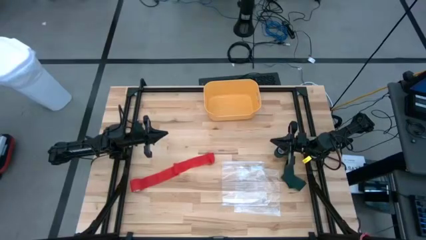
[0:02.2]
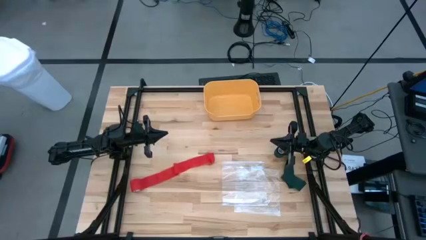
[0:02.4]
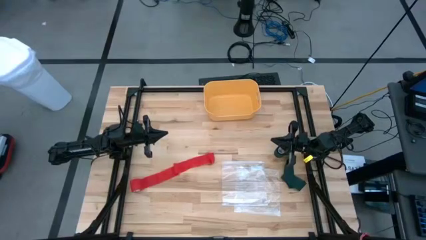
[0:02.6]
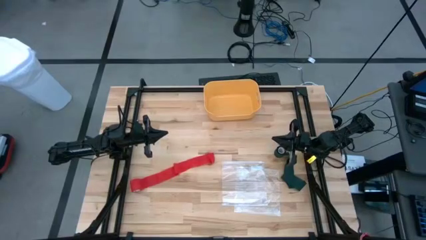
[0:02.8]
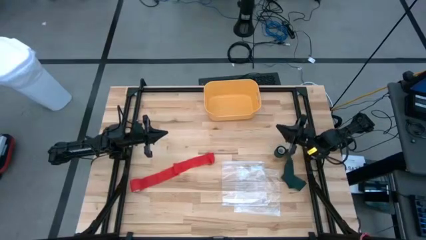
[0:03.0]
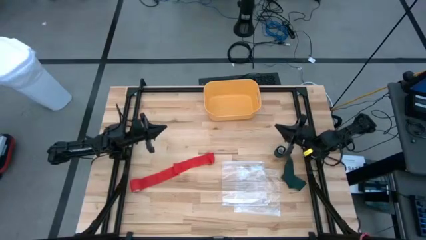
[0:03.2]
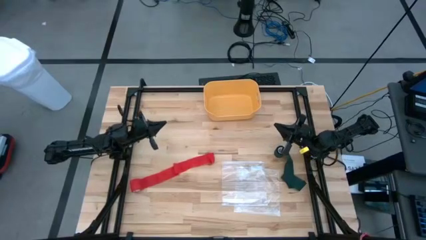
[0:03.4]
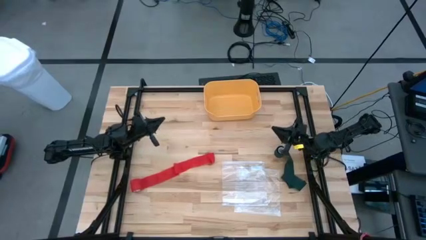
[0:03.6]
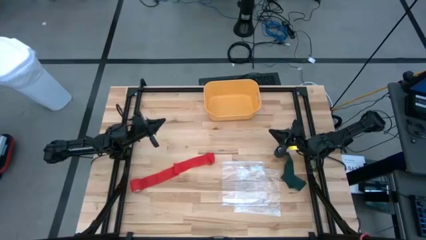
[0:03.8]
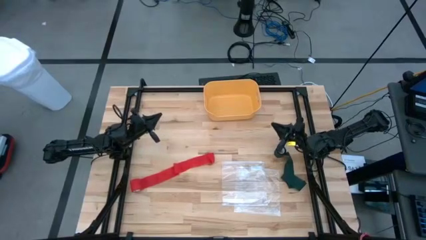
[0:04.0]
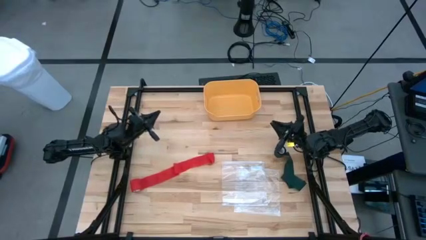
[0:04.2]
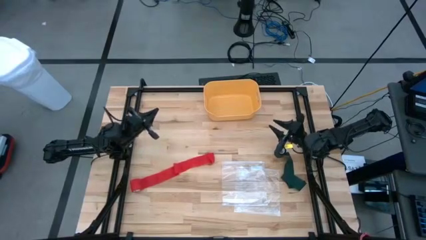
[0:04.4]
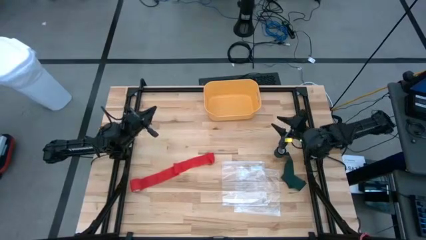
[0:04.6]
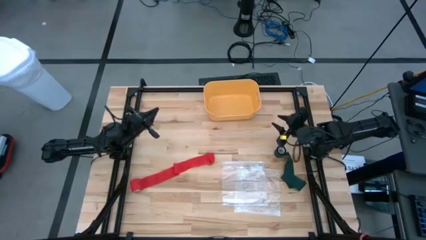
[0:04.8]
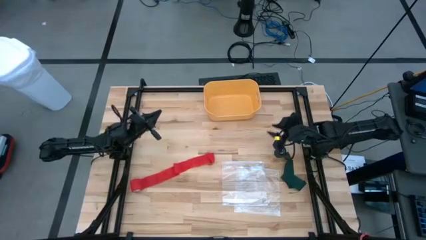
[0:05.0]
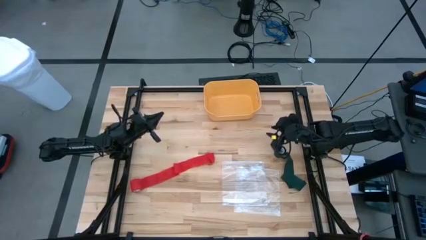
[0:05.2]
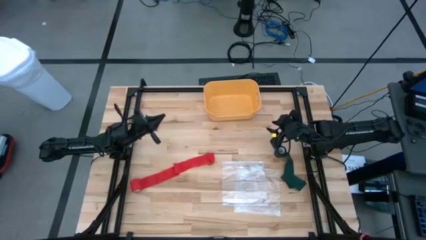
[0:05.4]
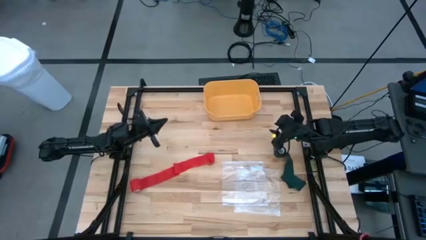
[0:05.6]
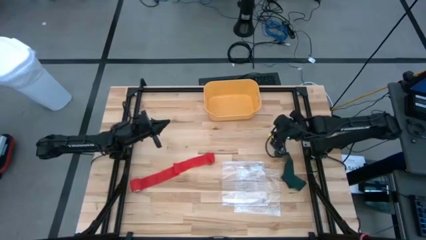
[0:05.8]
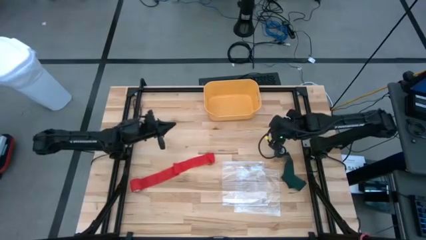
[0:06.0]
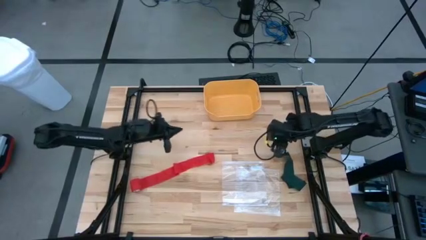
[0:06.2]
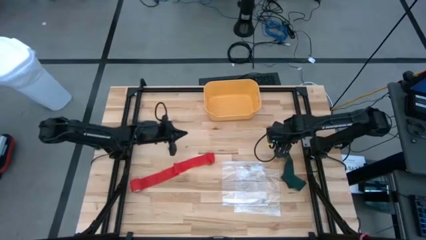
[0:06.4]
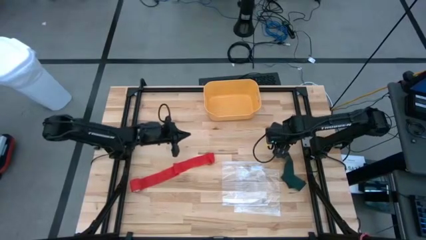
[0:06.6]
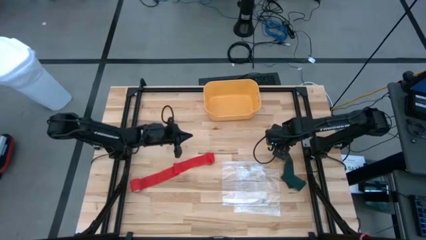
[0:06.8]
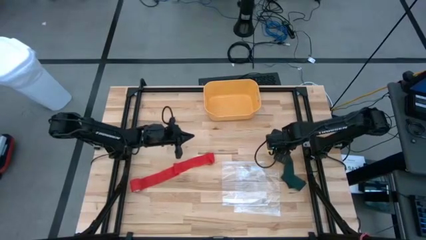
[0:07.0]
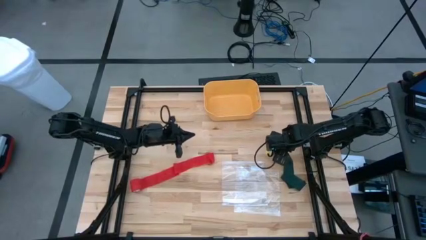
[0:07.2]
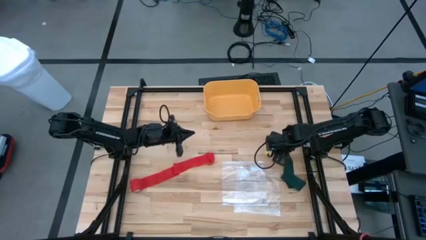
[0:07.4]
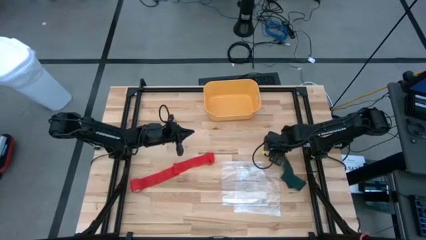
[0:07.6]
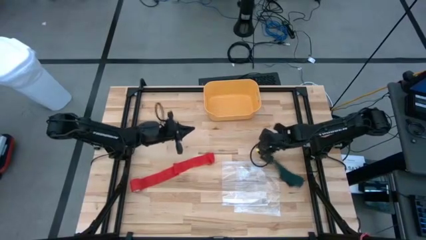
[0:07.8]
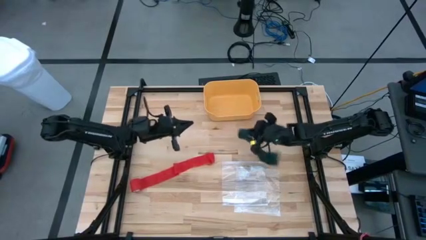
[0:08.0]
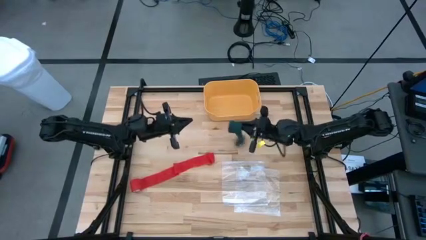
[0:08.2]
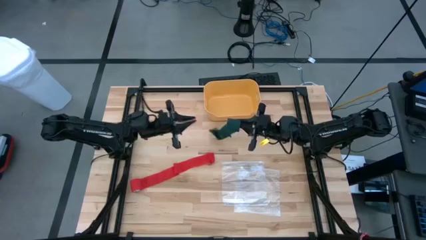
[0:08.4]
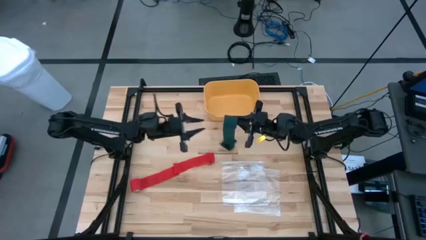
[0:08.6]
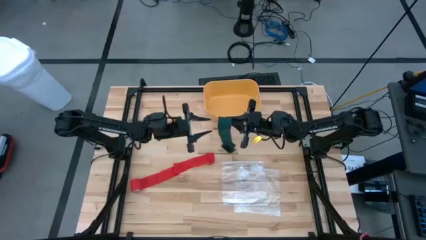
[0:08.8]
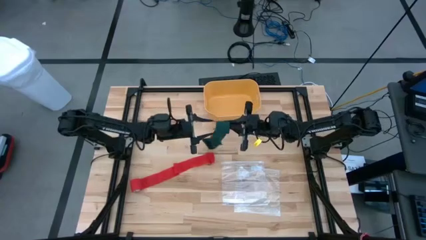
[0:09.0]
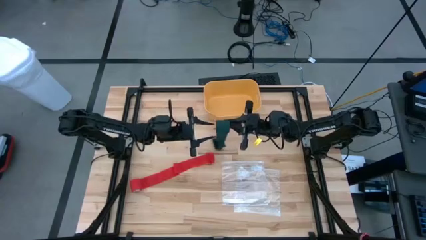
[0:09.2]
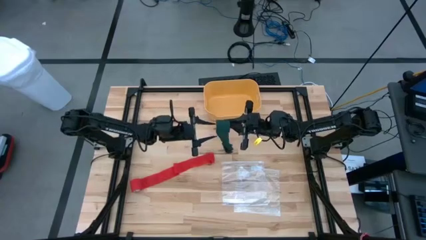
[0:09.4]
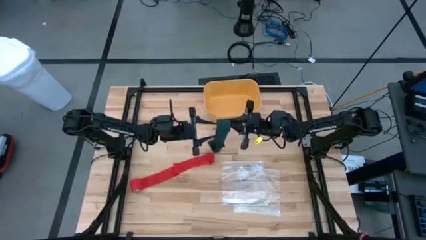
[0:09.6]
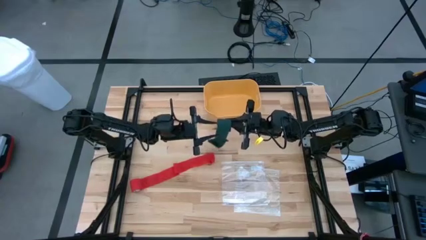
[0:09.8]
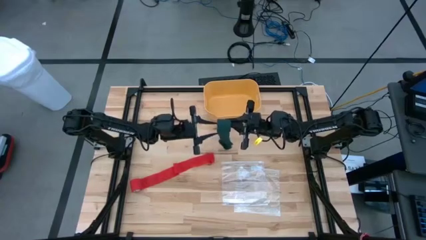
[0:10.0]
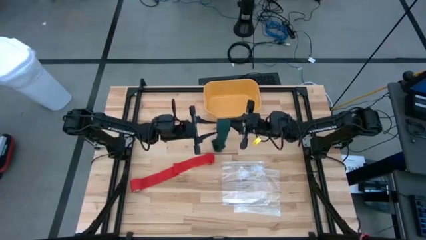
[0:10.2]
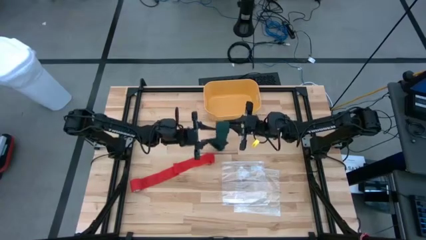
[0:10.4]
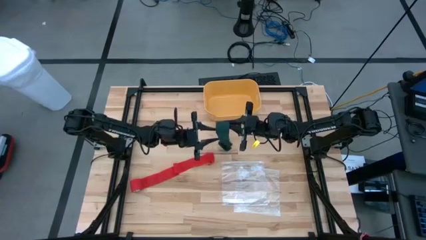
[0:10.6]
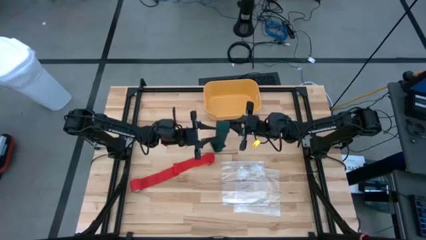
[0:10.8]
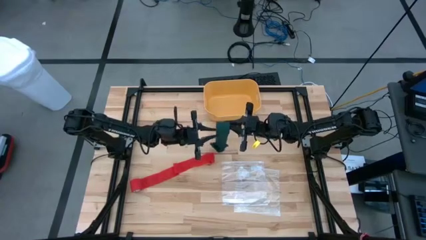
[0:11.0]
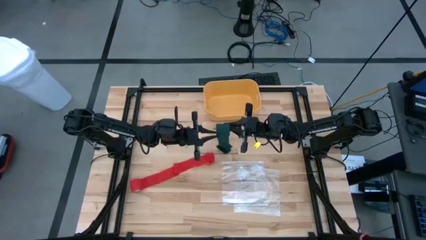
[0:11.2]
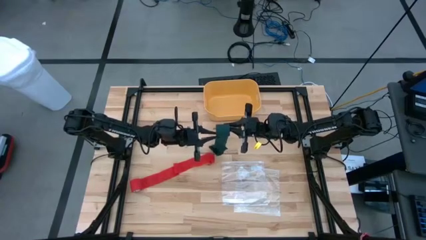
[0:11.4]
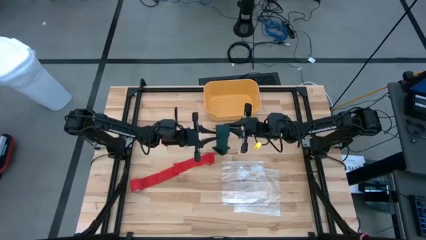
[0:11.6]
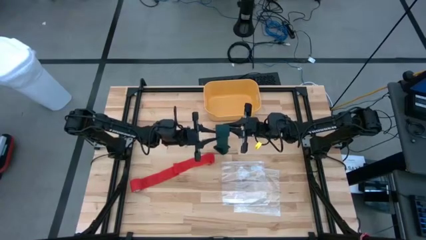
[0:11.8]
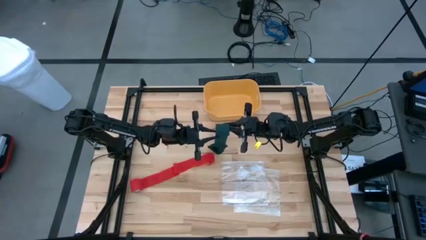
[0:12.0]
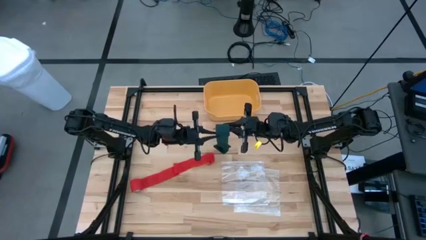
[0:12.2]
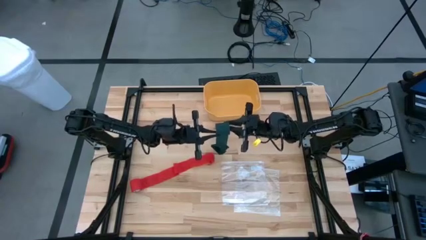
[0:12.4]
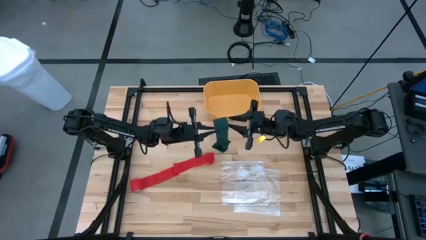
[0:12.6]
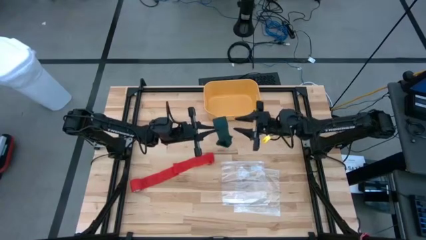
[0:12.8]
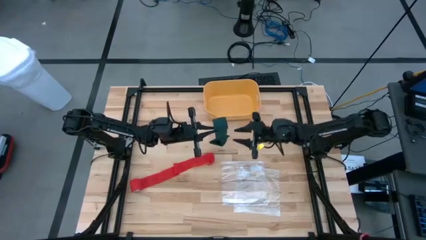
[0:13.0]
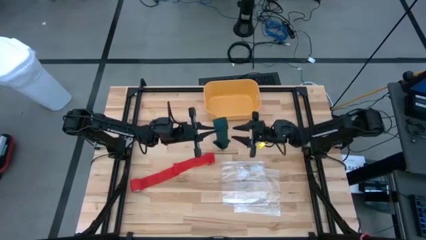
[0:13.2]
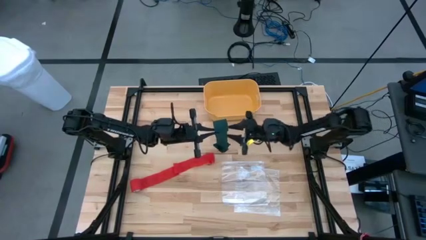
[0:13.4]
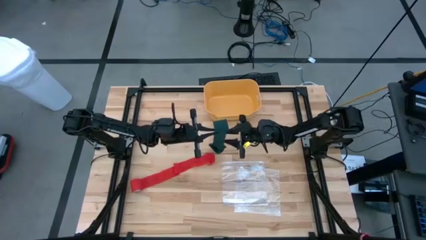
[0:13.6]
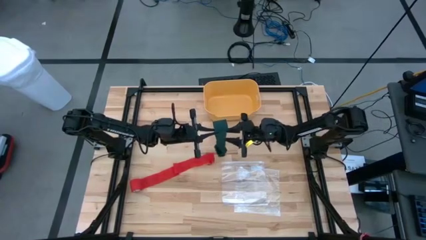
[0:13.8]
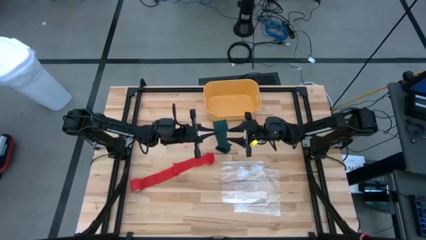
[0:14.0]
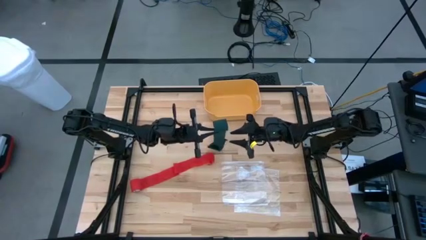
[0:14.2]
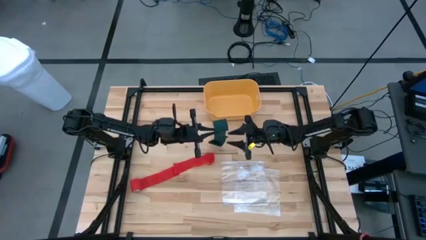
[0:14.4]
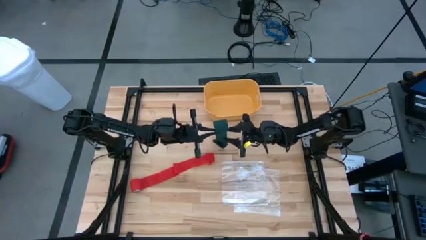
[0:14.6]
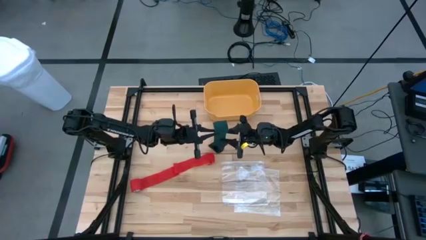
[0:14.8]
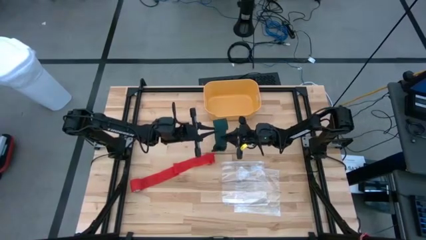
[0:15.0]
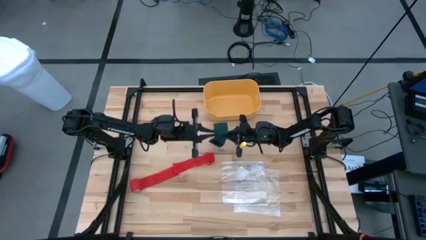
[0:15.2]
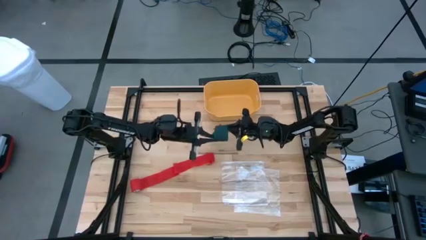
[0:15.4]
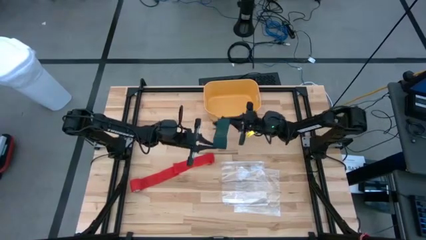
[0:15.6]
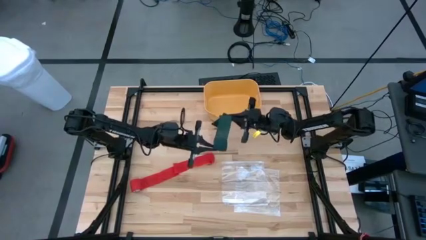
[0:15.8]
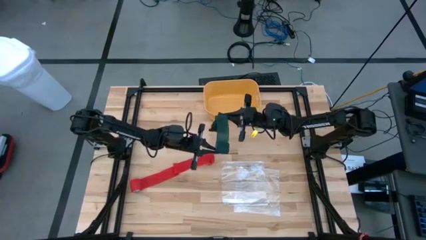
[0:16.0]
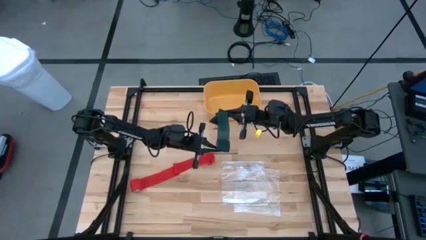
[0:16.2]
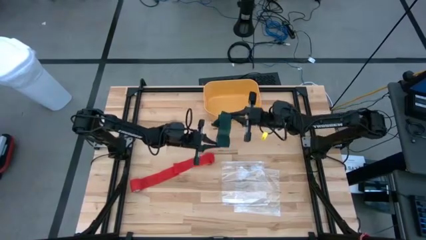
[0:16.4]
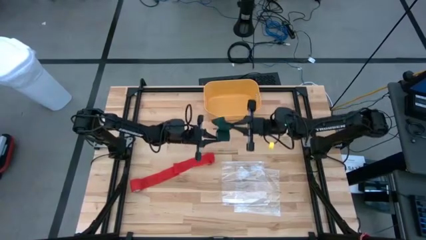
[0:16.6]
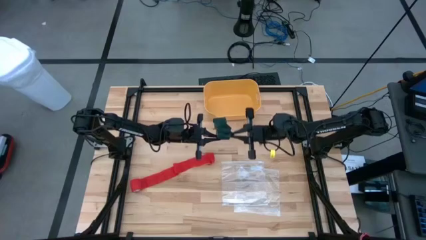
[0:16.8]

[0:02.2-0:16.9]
Task: Roll bandage
Roll the green bandage
